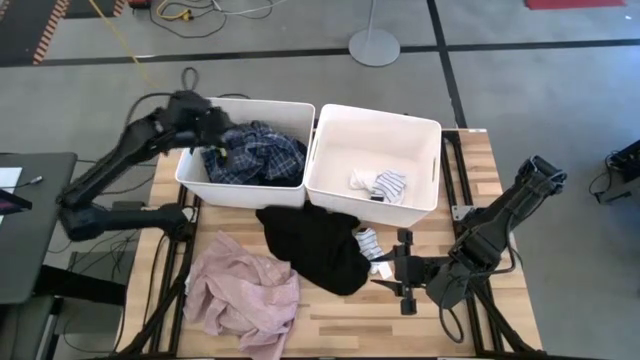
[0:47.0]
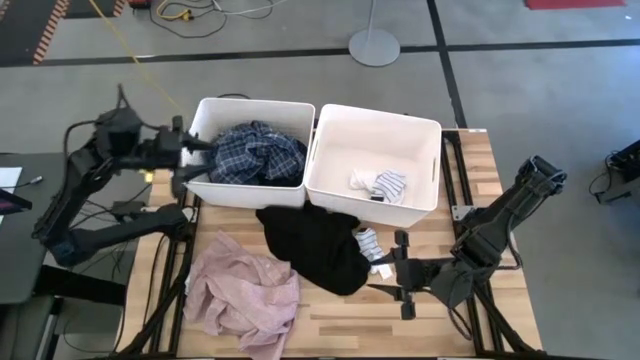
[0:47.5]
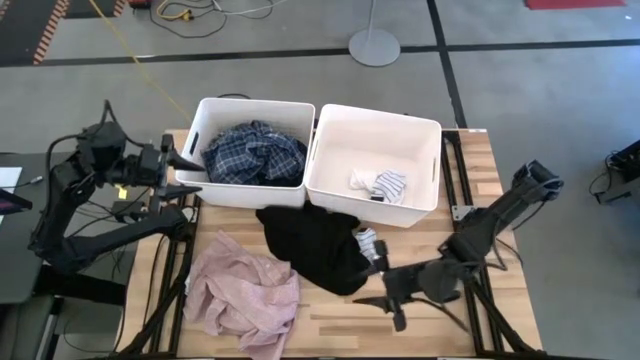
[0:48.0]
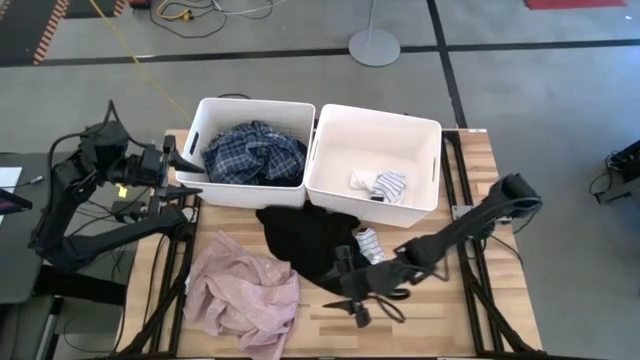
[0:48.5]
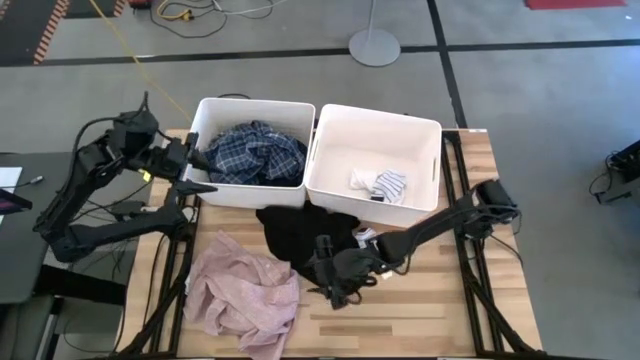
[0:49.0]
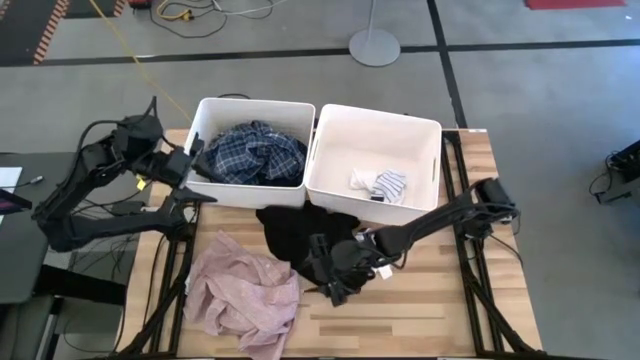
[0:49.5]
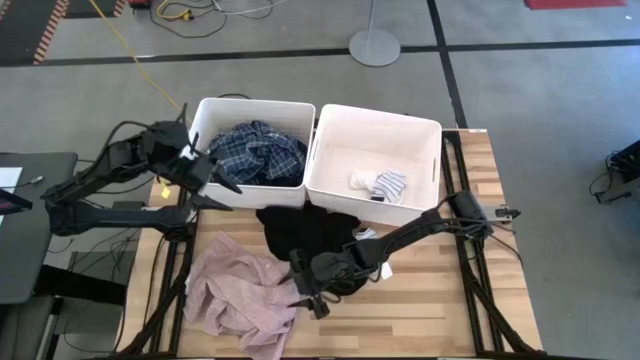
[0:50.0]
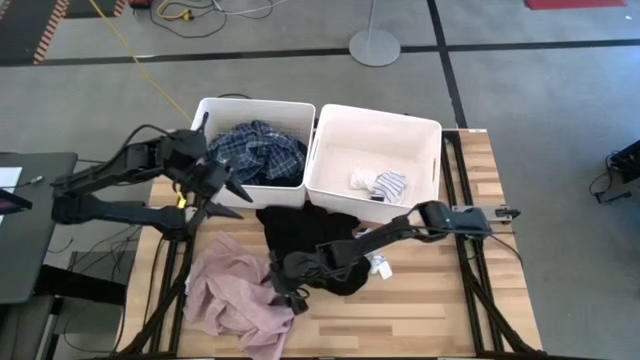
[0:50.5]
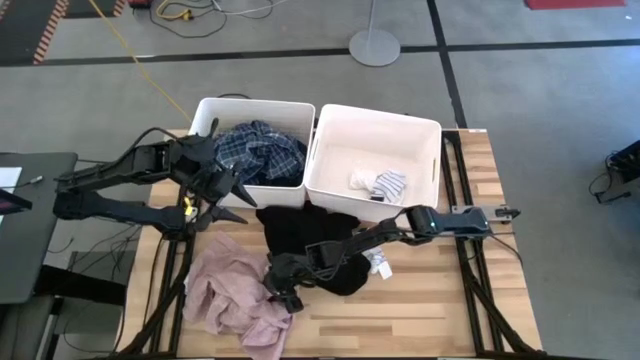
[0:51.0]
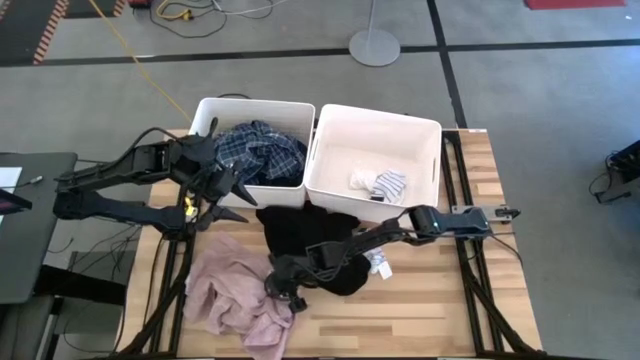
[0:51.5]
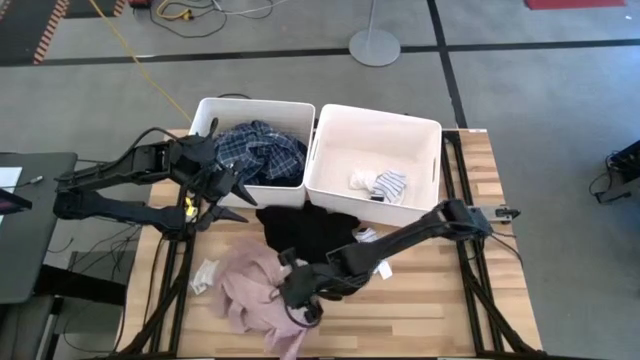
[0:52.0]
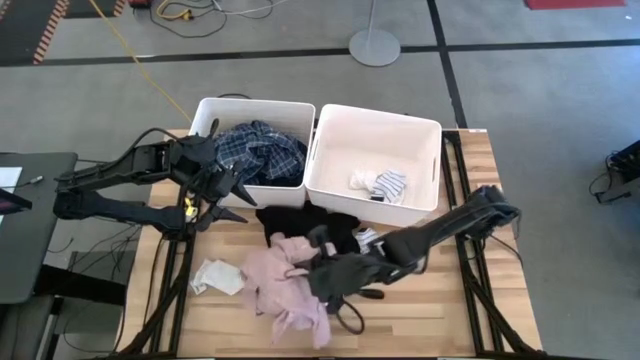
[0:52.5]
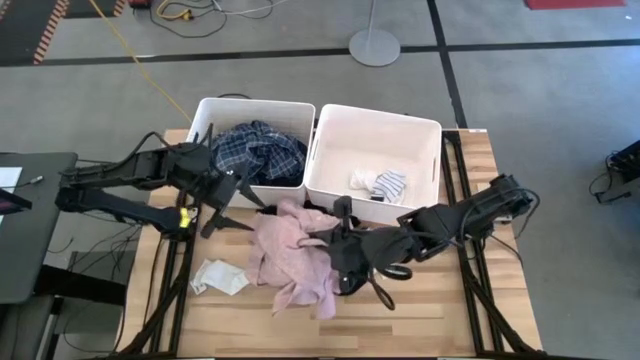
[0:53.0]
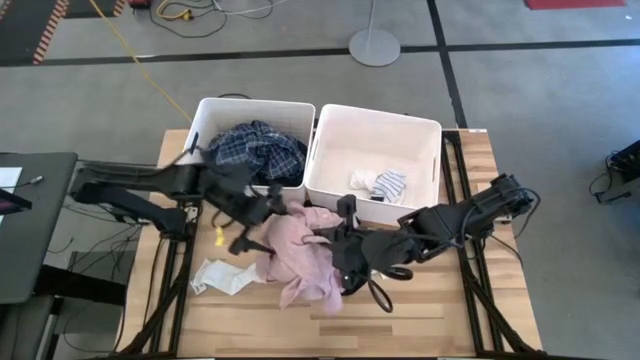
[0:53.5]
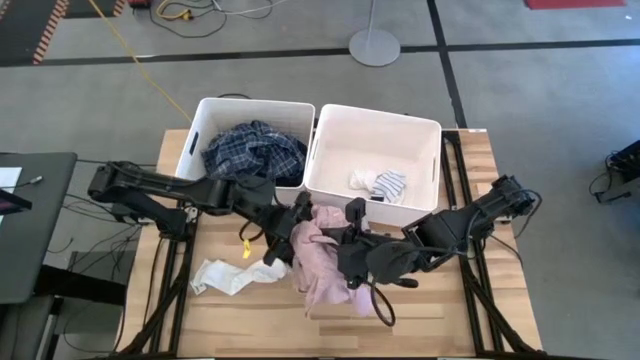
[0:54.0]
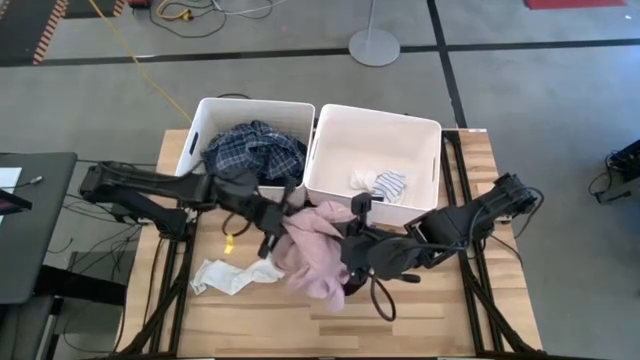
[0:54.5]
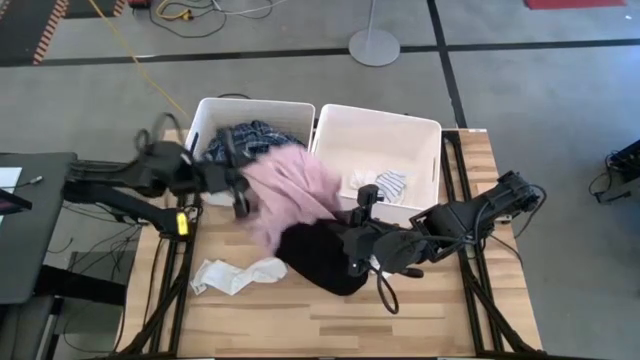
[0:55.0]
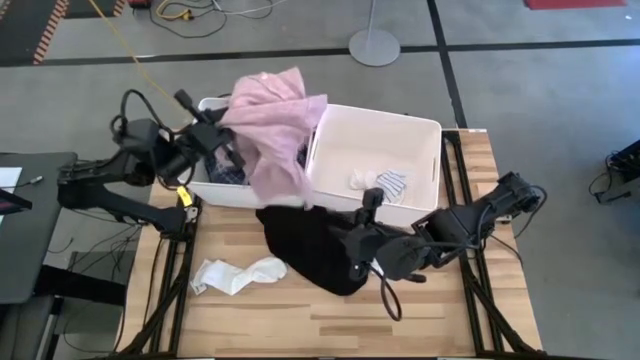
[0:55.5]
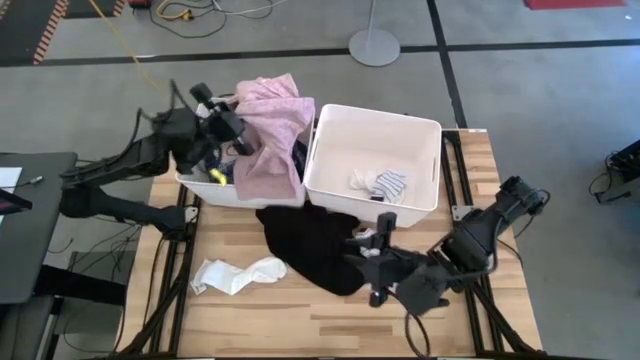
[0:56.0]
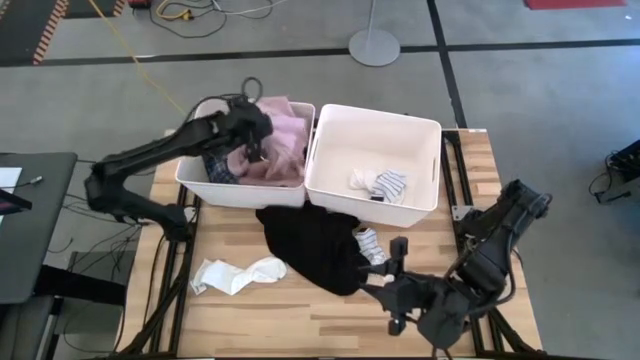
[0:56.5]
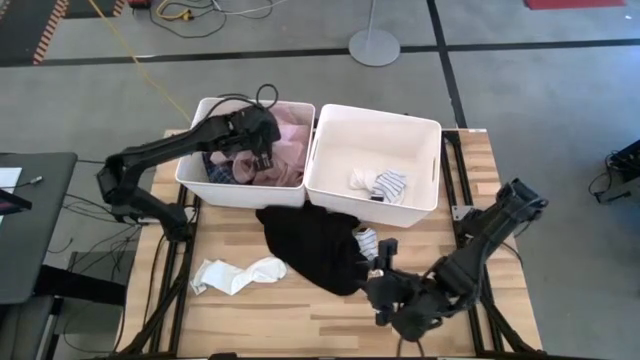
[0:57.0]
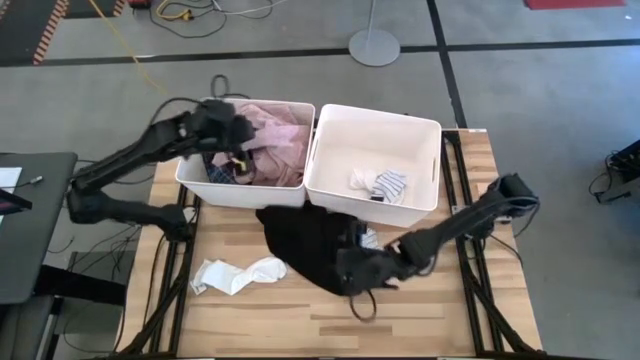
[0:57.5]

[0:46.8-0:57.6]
Task: Sort clothes
Put the pink long sleeve into the left white laundry bin

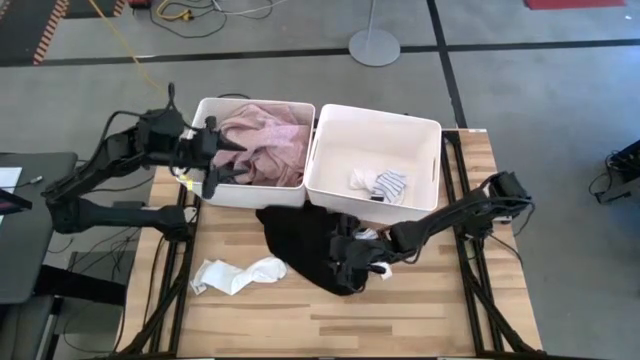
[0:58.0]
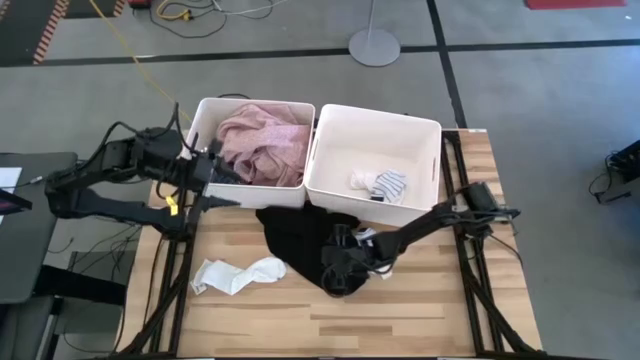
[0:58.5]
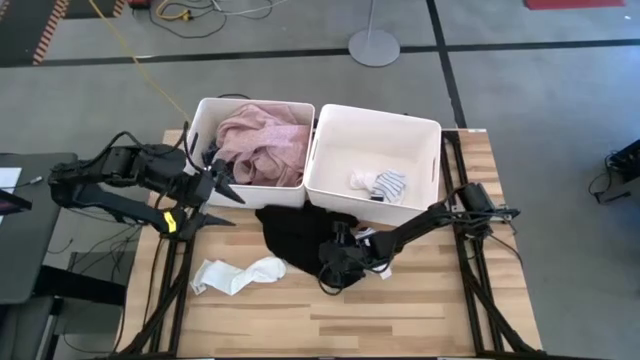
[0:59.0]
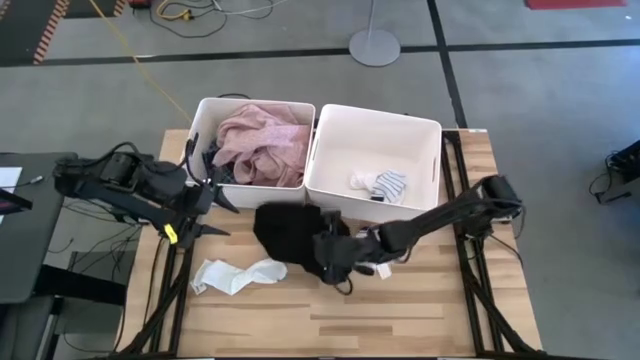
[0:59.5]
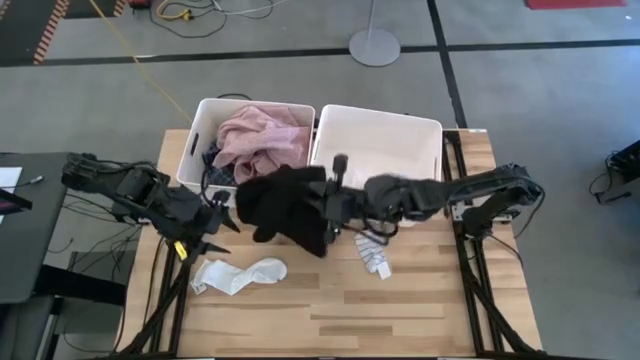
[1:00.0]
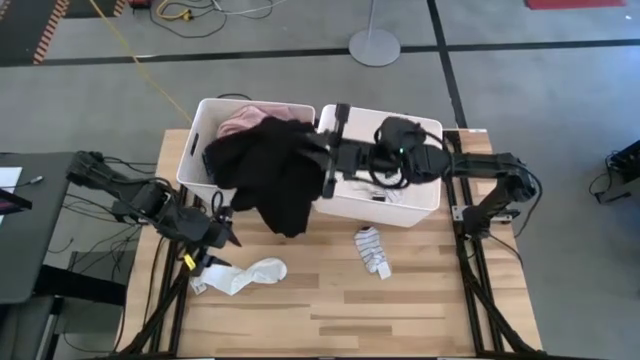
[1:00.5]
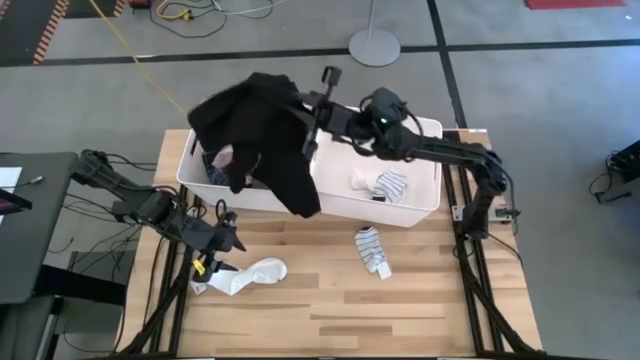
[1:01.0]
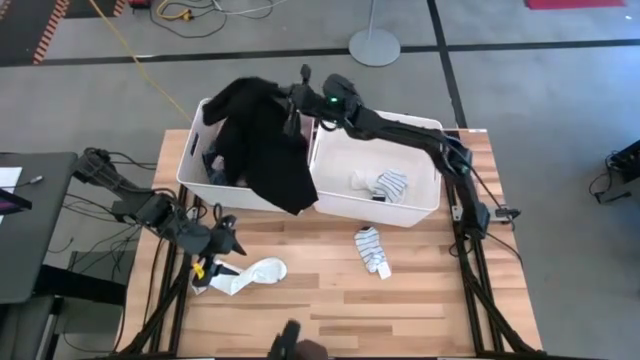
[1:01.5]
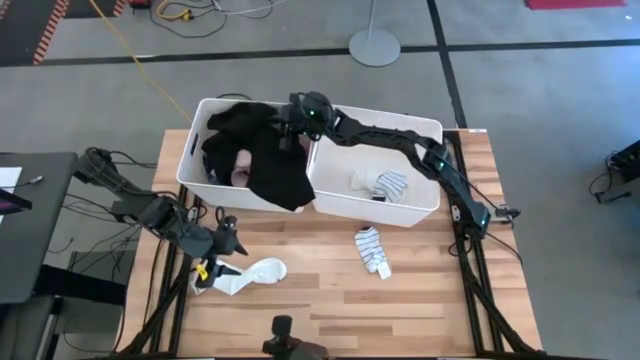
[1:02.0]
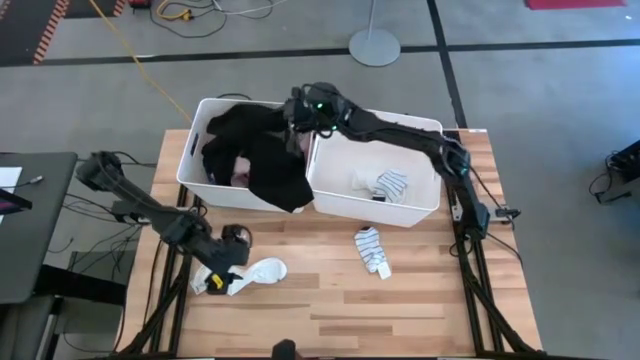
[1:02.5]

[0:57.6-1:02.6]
Put the black shirt into the left white laundry bin

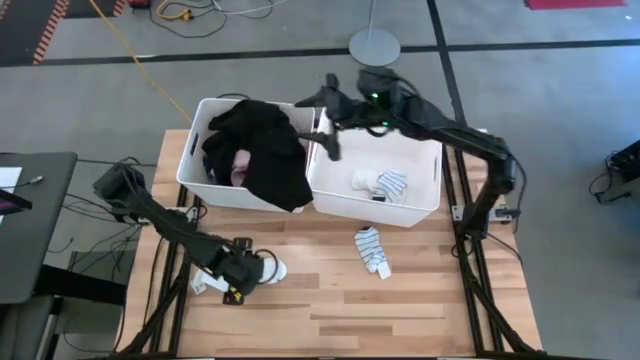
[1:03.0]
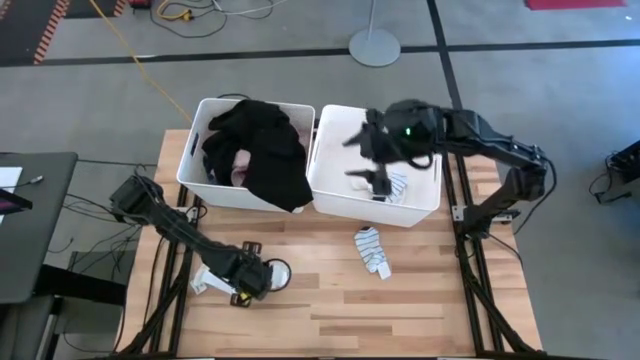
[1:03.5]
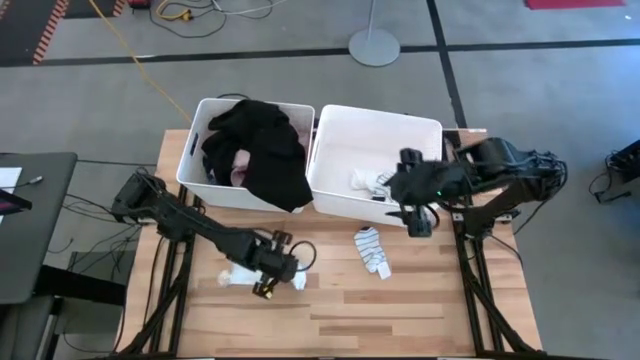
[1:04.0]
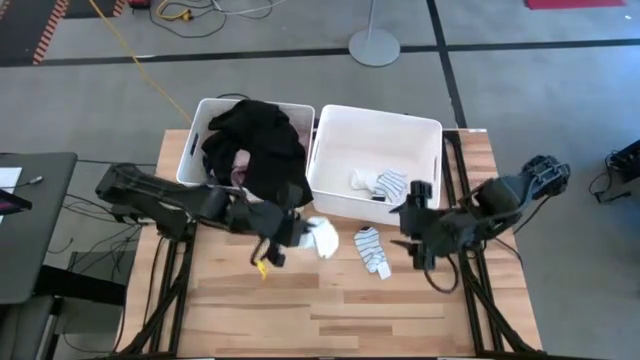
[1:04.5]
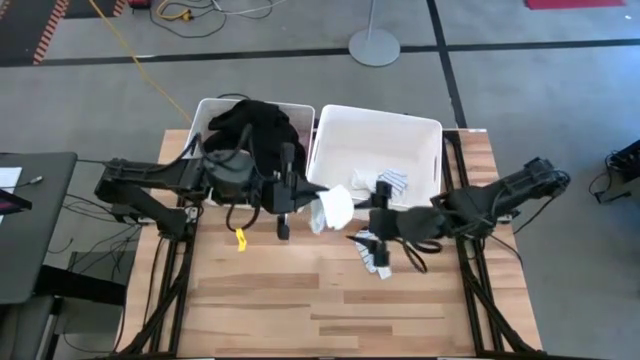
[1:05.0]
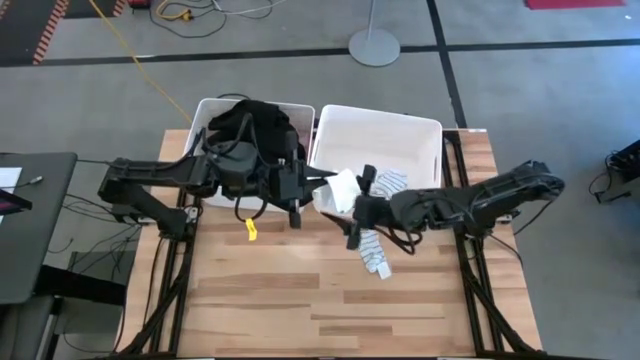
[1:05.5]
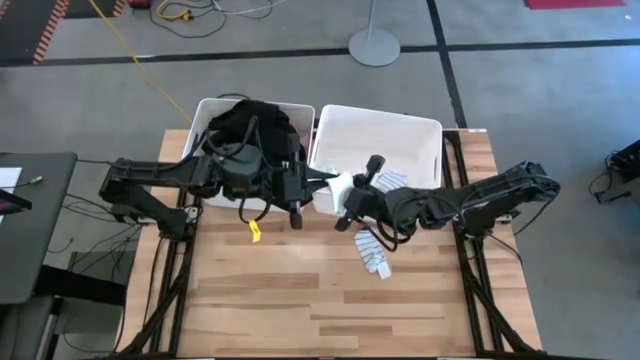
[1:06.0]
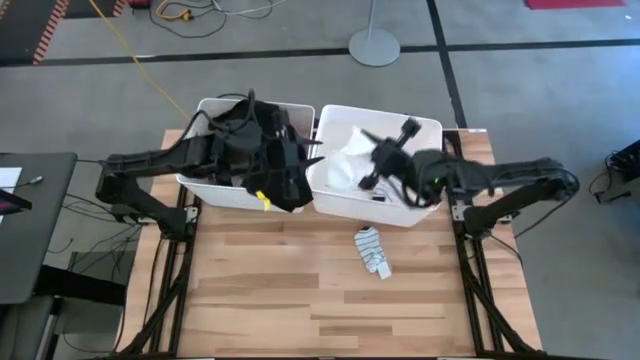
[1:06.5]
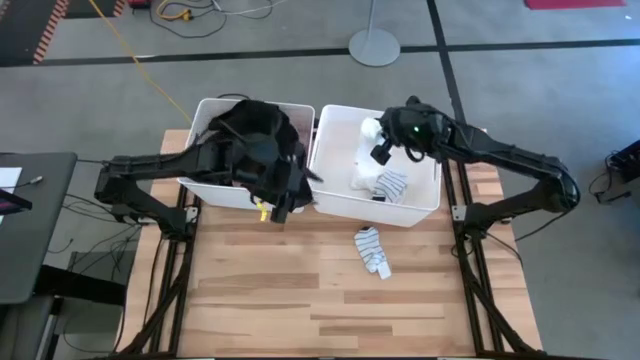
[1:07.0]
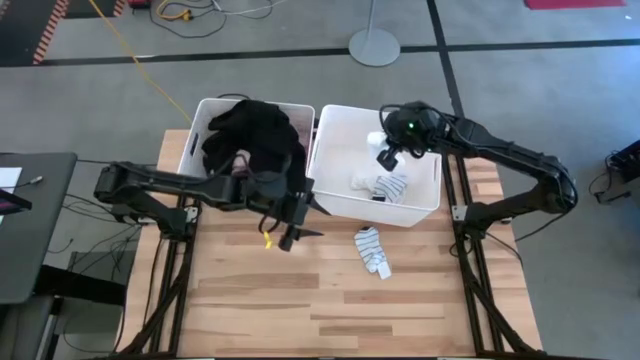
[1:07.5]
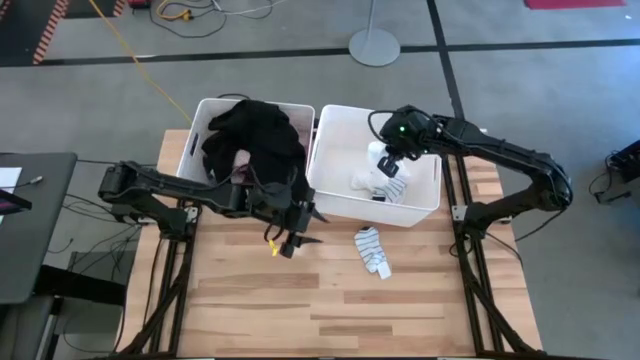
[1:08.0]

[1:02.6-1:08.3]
Put the white sock into the left white laundry bin
